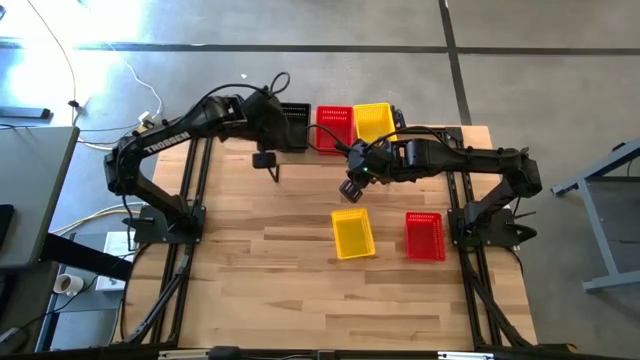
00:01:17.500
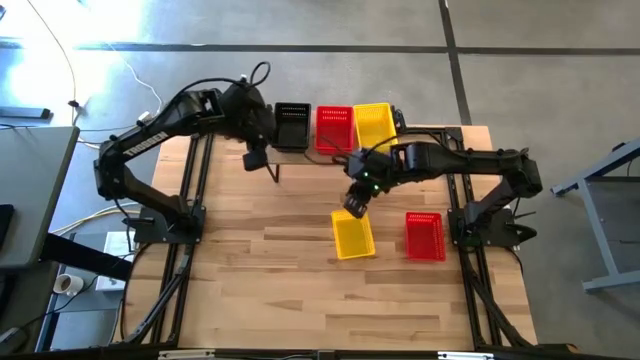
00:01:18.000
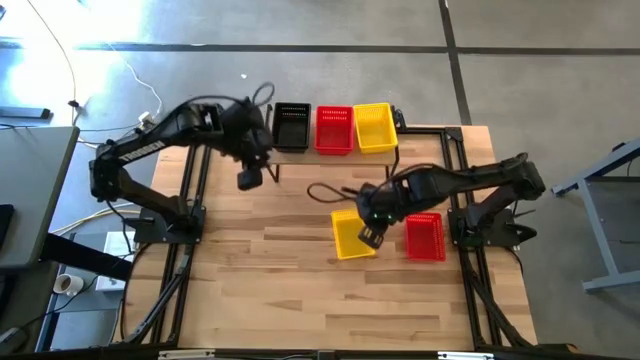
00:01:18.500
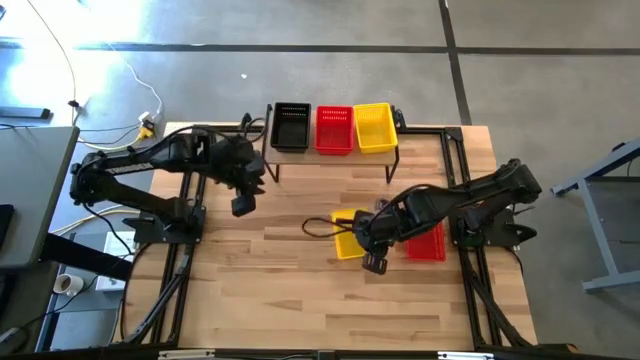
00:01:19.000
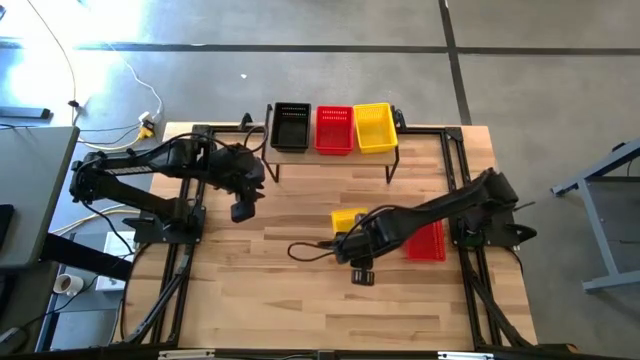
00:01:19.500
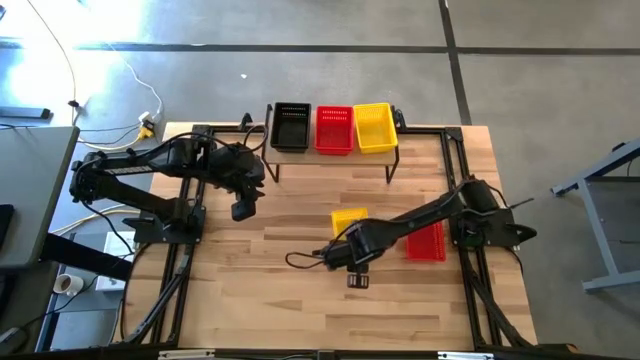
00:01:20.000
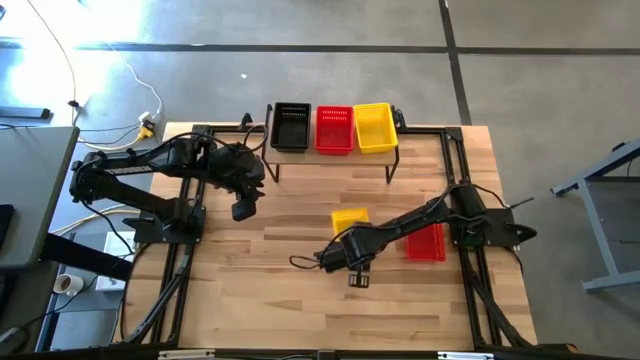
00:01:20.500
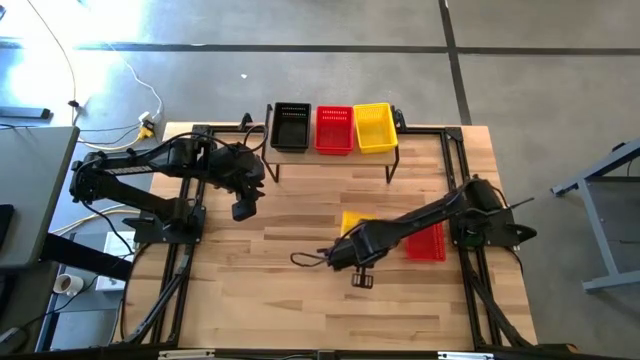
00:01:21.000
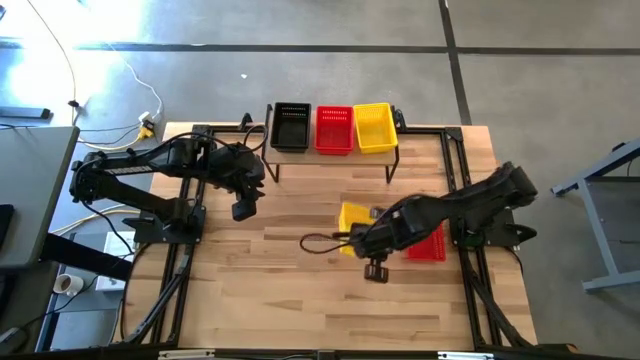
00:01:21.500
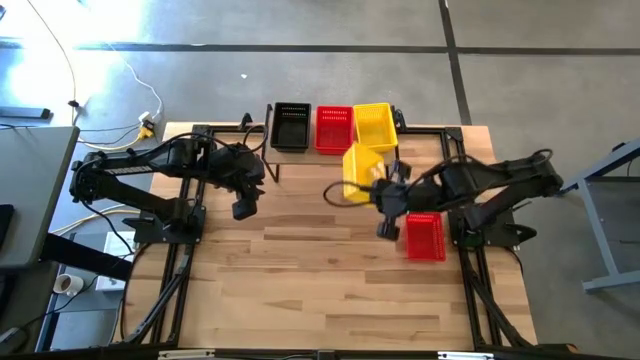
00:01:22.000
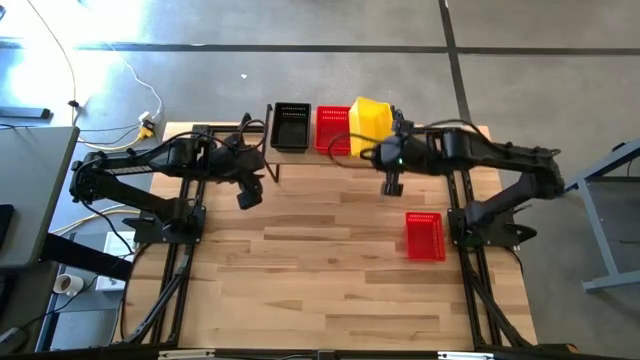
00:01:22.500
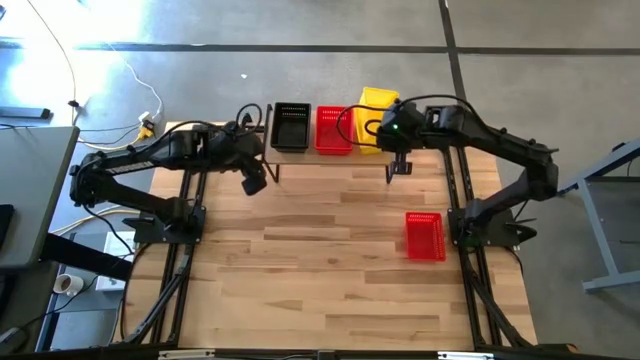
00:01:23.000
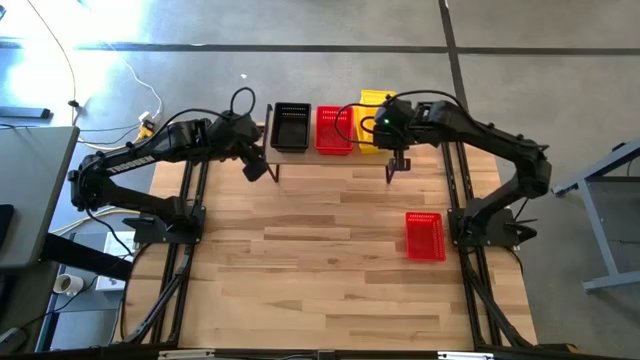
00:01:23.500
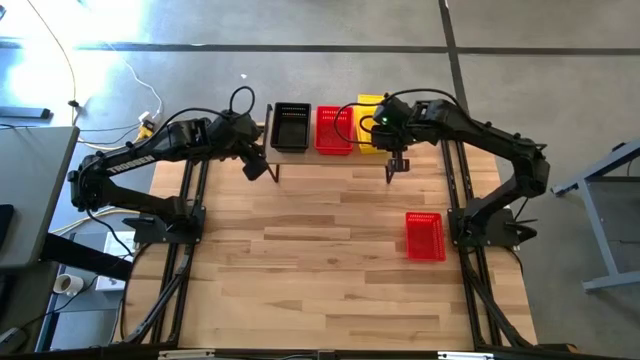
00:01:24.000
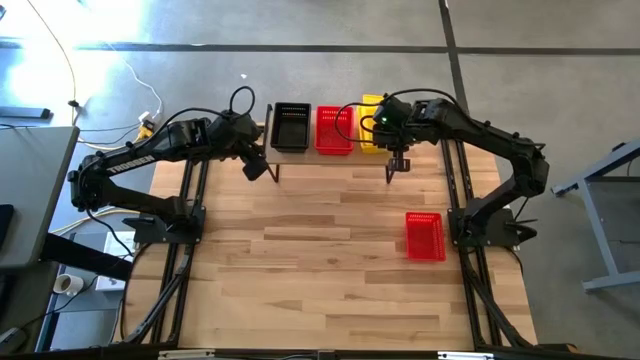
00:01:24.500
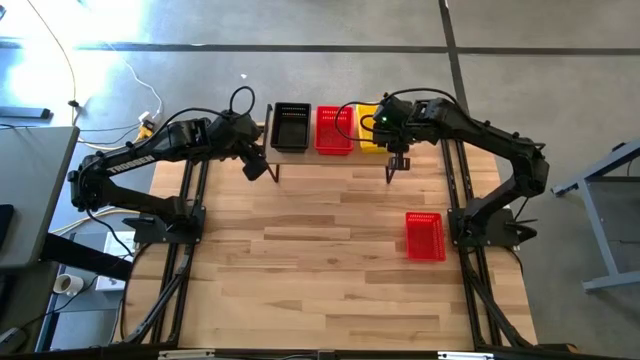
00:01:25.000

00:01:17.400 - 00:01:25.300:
Task: Stack baskets on shelf by color
Stack the yellow basket on top of the yellow basket on the shelf

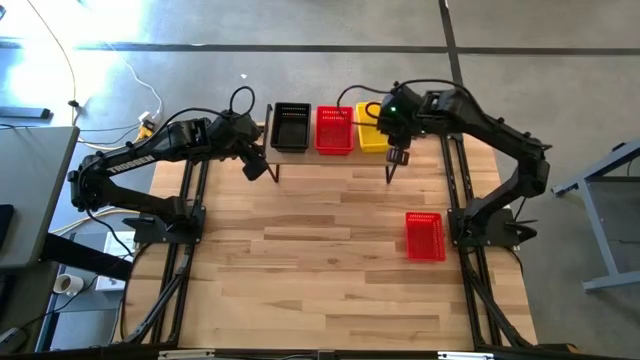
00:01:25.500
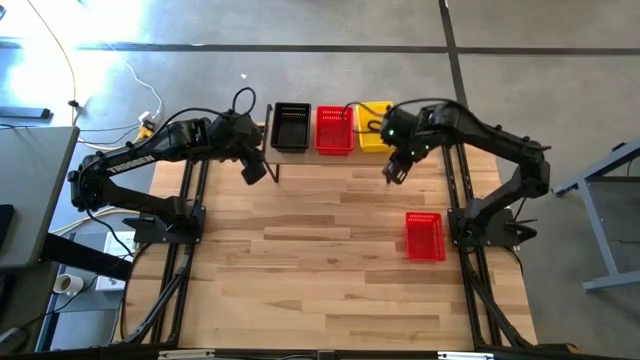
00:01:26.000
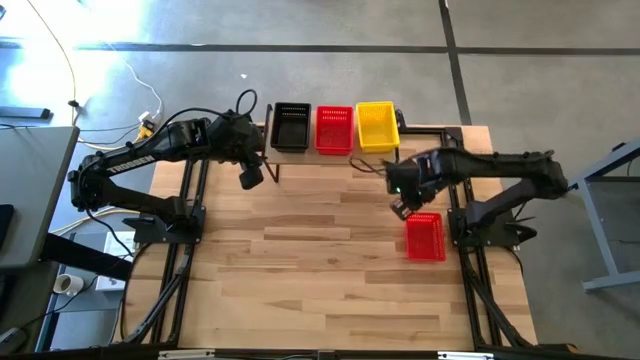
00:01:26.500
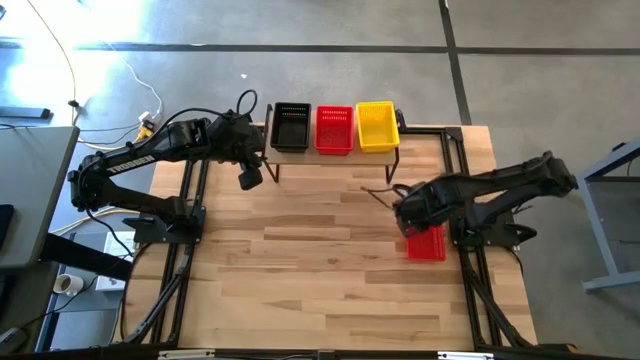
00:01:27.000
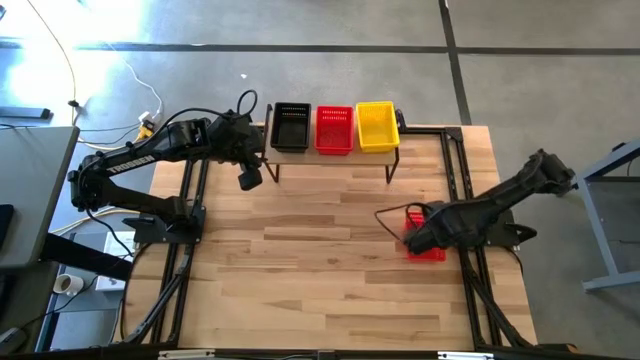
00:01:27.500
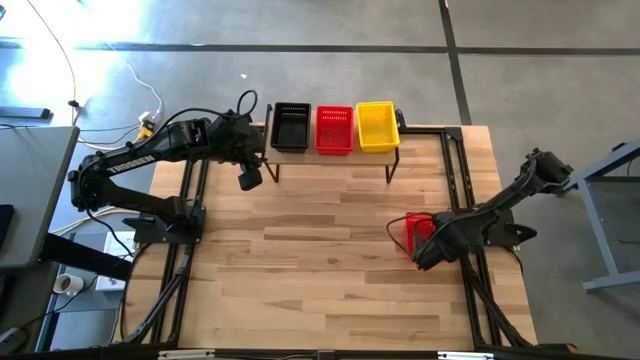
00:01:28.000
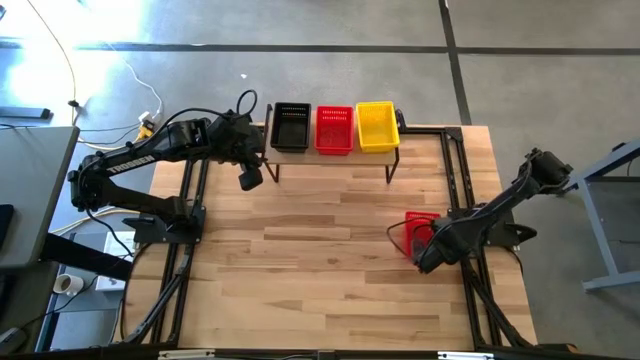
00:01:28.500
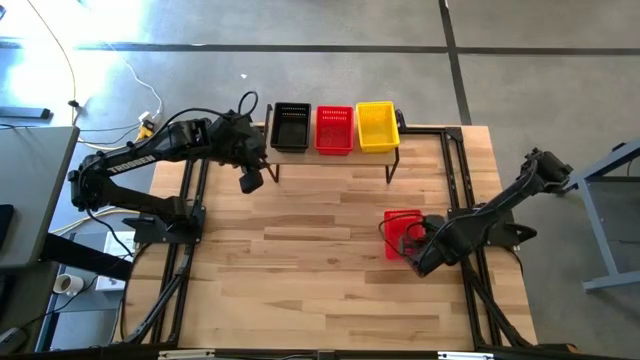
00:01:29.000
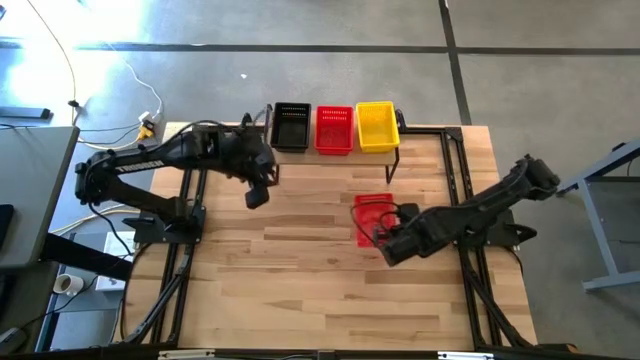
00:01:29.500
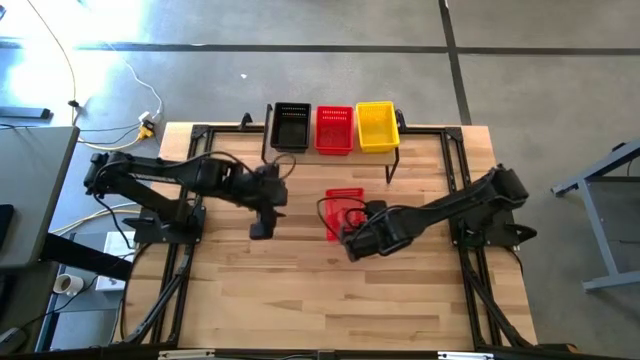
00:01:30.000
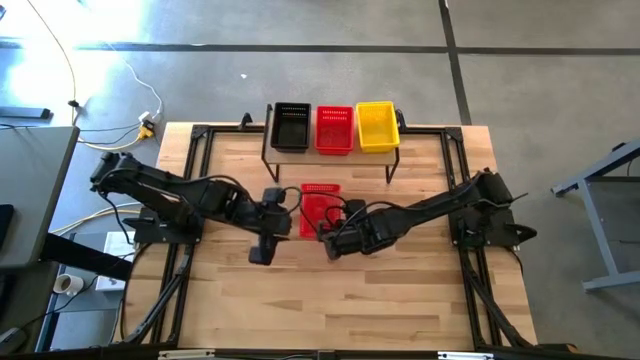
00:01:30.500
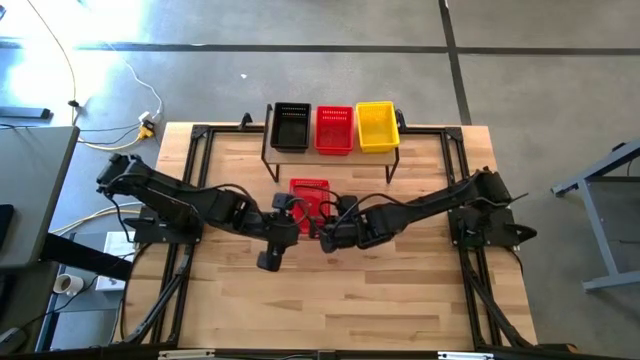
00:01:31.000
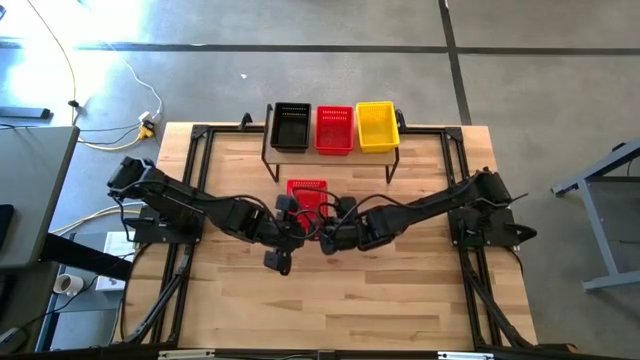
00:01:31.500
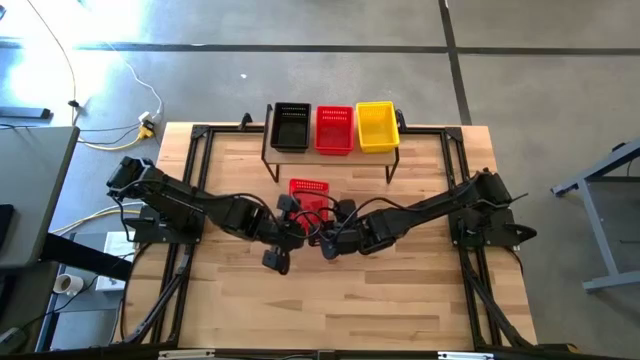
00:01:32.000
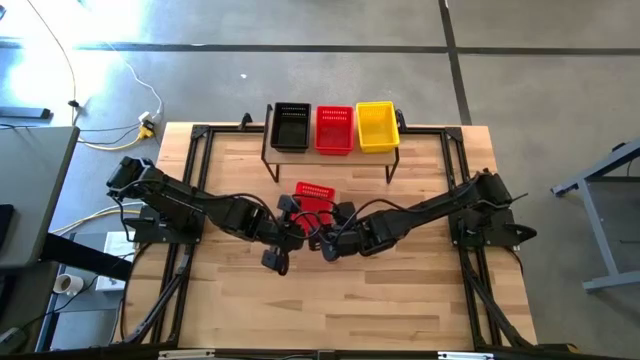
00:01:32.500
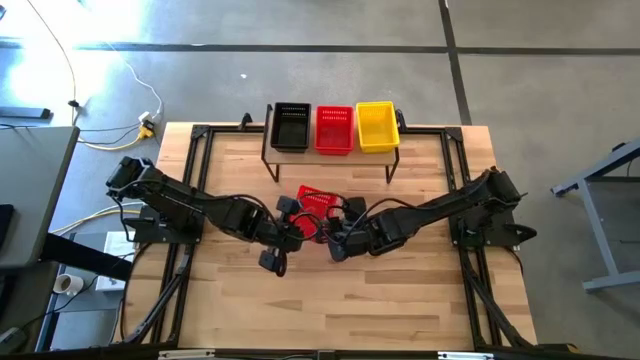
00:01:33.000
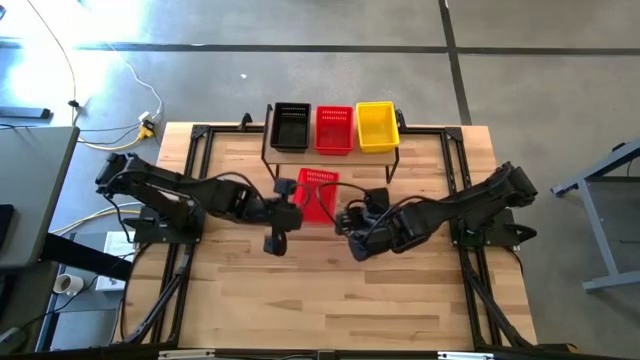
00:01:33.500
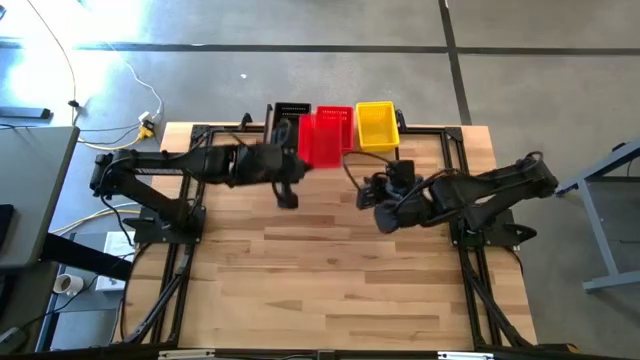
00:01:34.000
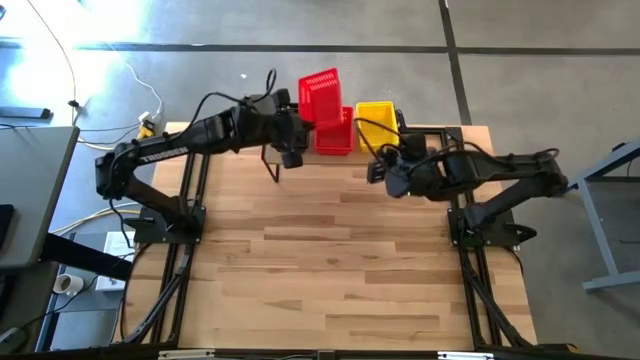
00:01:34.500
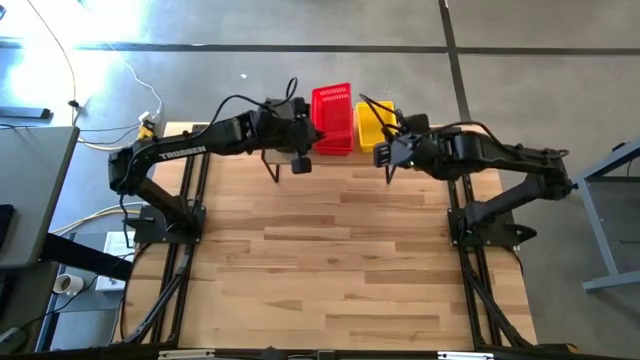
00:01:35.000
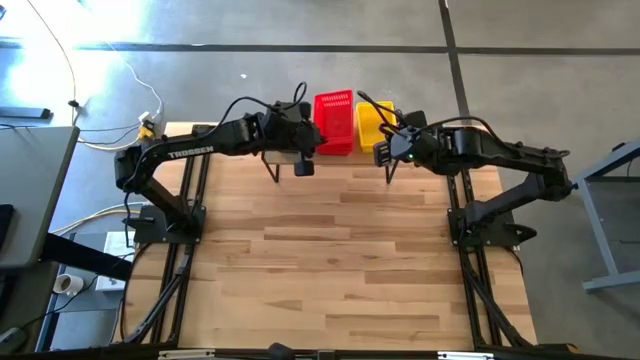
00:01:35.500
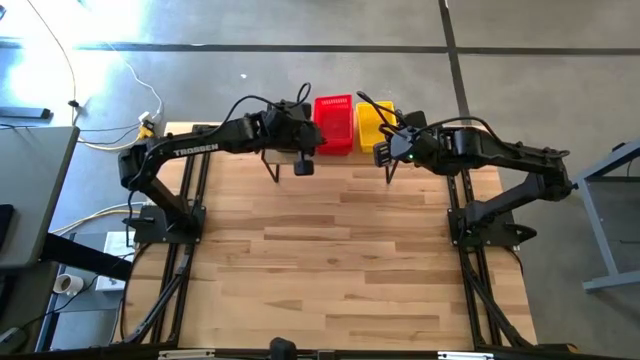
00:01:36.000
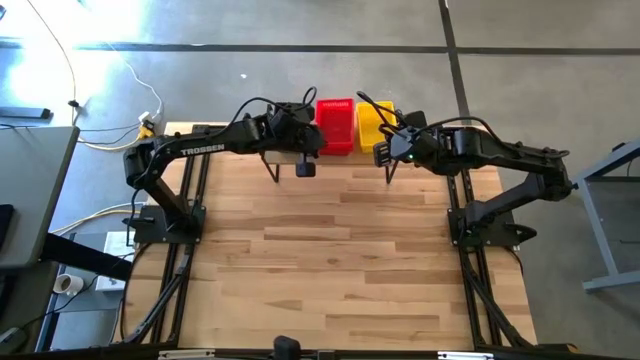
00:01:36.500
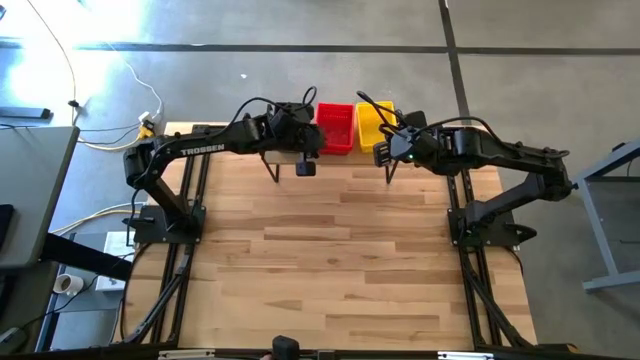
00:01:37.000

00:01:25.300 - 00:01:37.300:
Stack the red basket on top of the red basket on the shelf

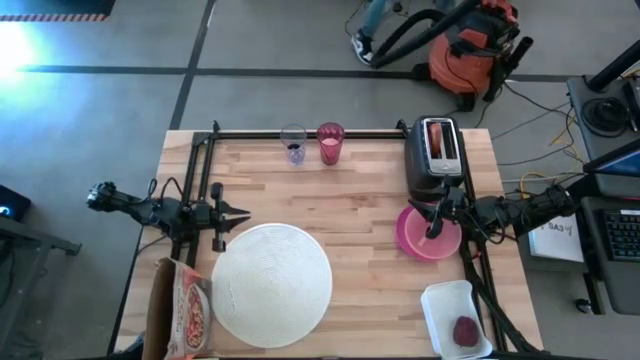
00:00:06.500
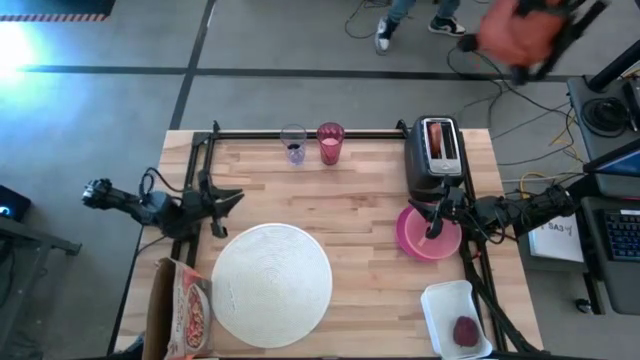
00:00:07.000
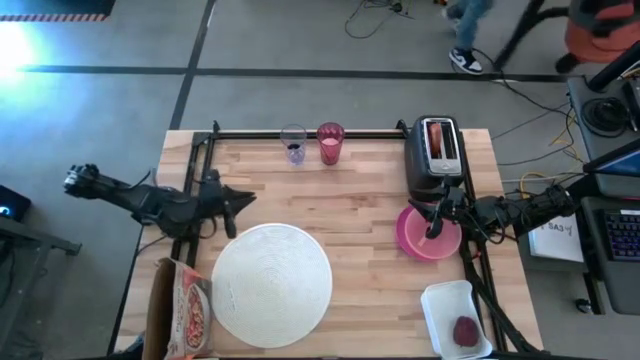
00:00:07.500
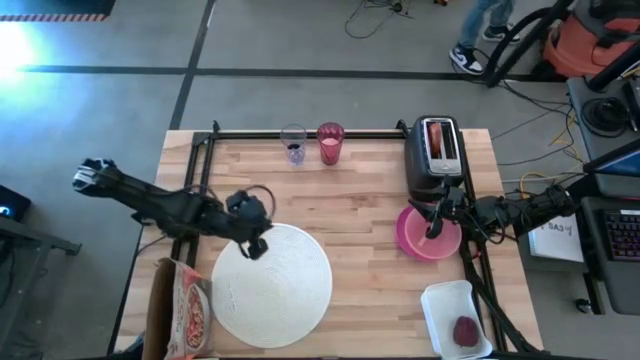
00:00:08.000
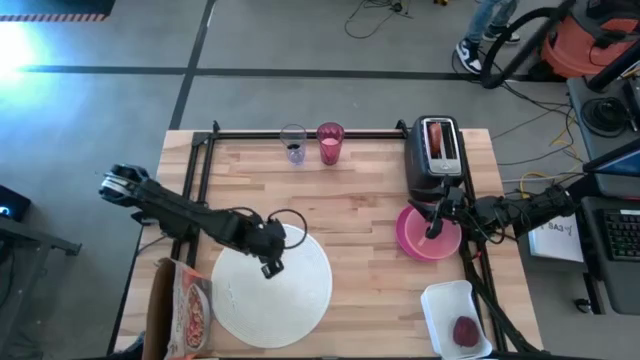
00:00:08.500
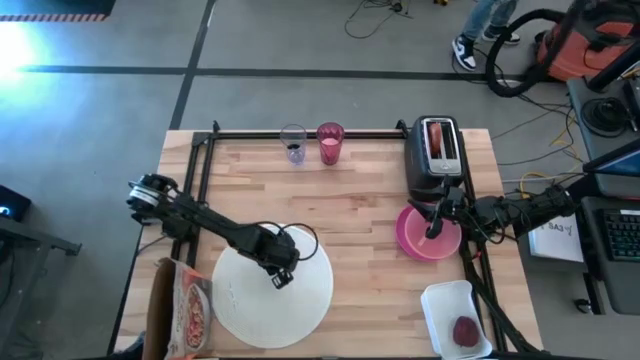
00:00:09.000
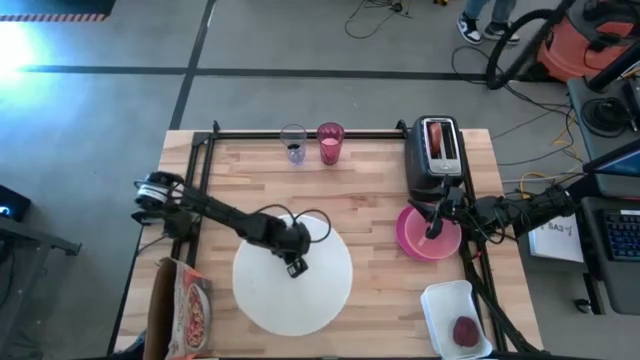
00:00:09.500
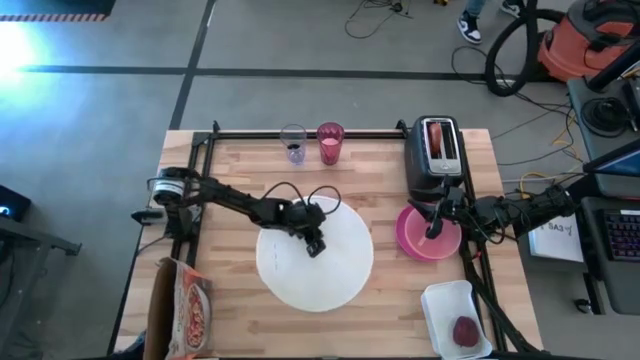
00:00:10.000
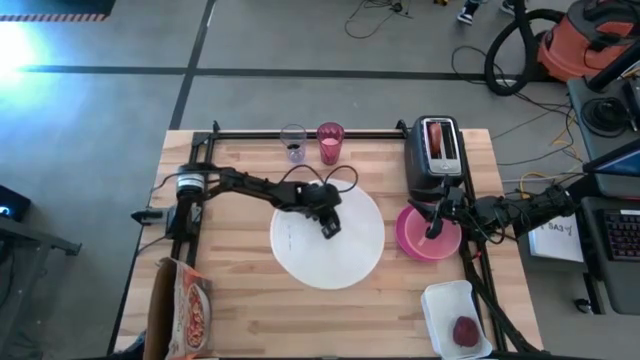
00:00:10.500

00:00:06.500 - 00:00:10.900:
Task: Arrange a breakfast setting
Move the table mat to the center of the table
